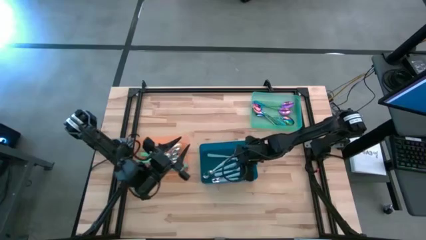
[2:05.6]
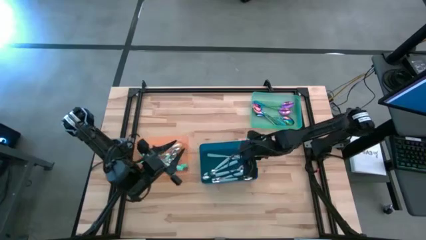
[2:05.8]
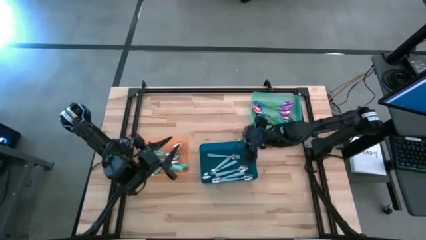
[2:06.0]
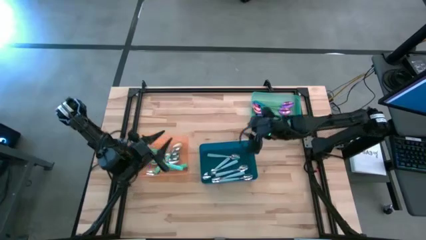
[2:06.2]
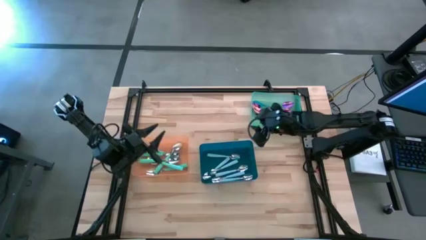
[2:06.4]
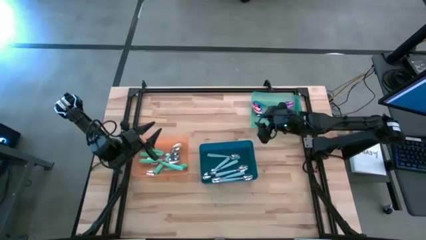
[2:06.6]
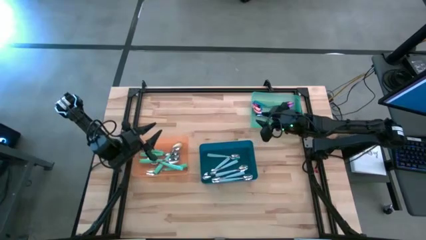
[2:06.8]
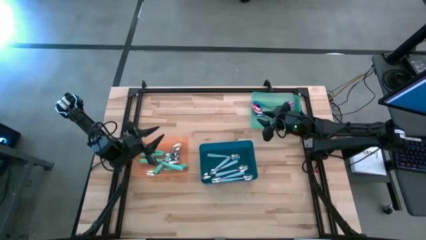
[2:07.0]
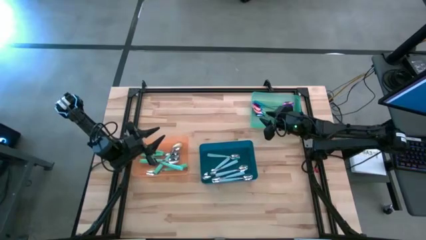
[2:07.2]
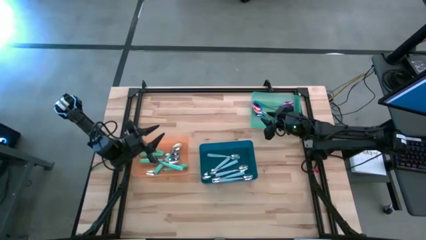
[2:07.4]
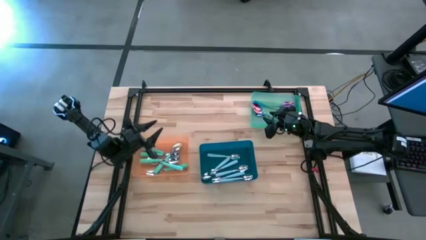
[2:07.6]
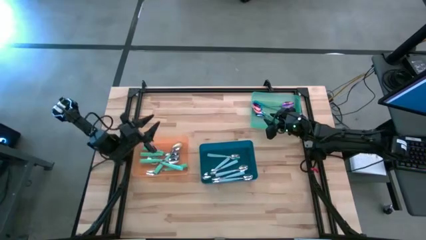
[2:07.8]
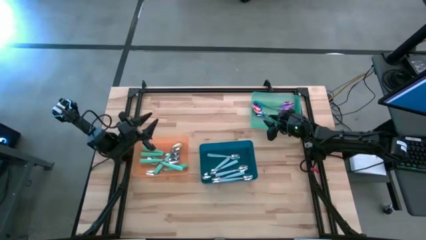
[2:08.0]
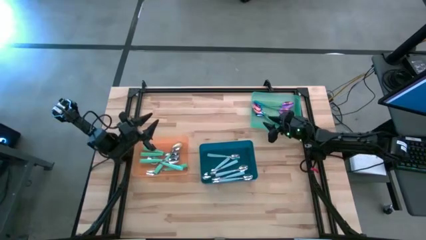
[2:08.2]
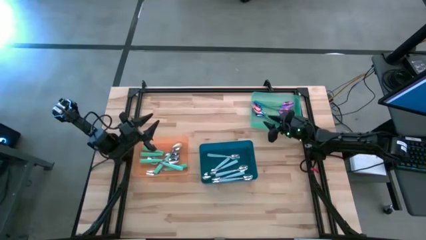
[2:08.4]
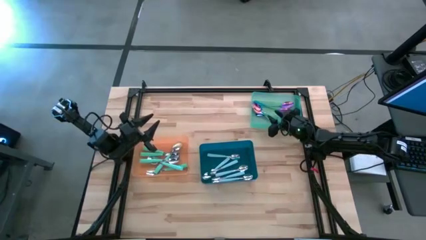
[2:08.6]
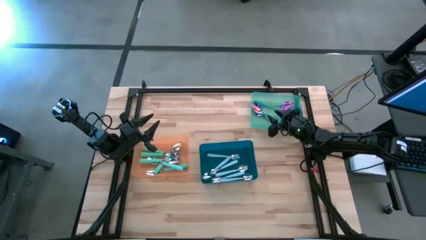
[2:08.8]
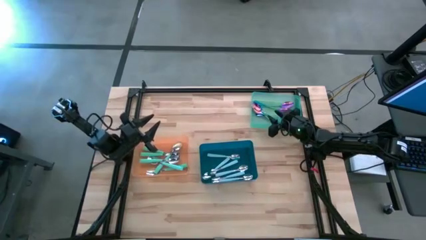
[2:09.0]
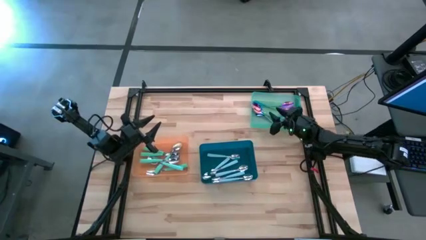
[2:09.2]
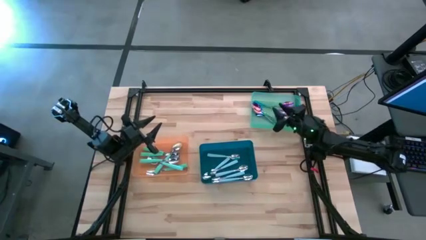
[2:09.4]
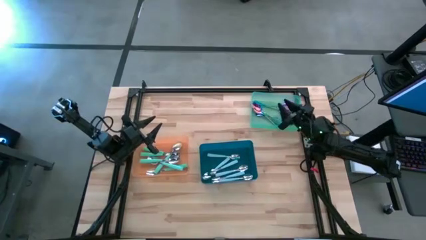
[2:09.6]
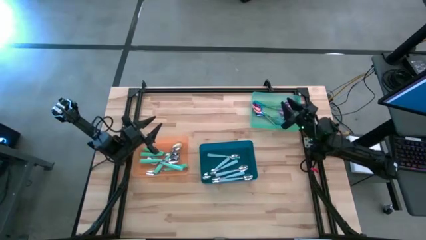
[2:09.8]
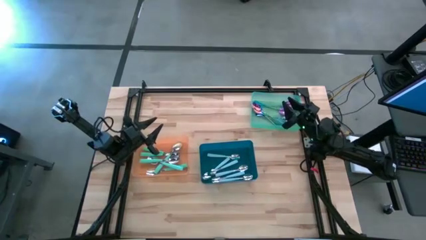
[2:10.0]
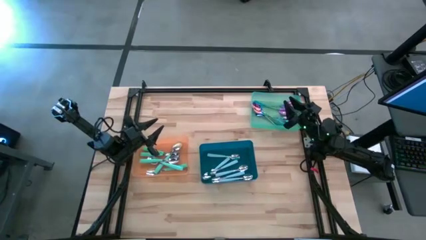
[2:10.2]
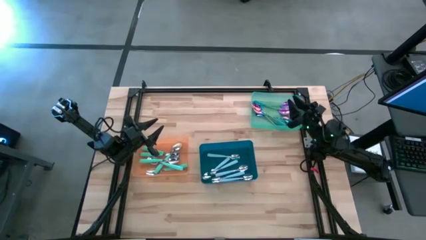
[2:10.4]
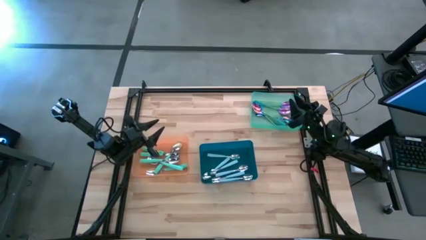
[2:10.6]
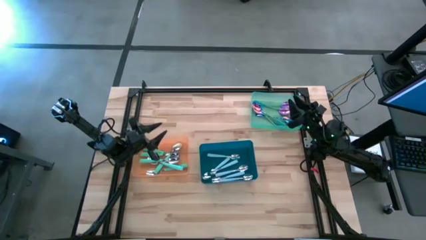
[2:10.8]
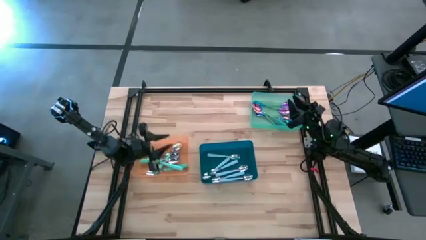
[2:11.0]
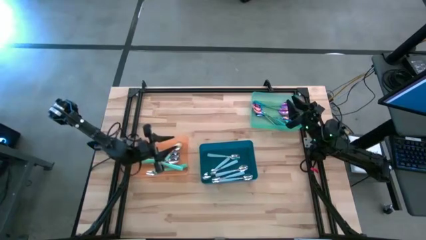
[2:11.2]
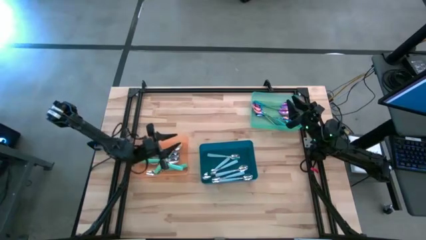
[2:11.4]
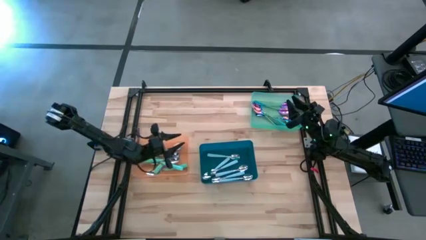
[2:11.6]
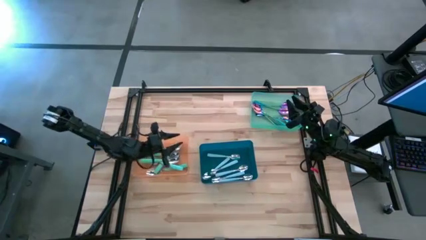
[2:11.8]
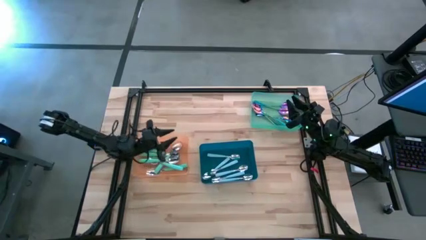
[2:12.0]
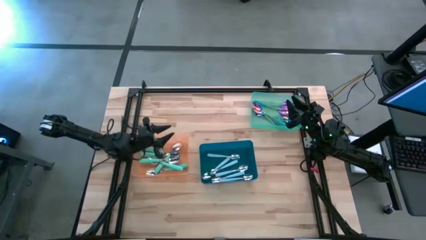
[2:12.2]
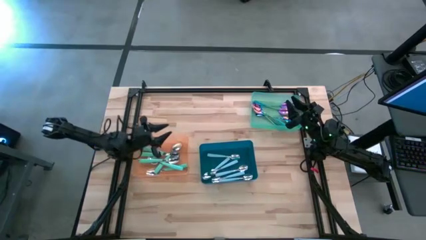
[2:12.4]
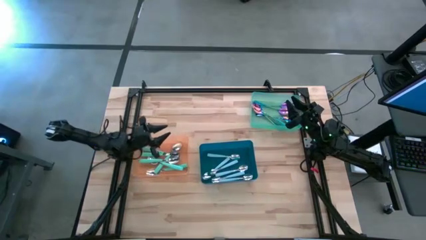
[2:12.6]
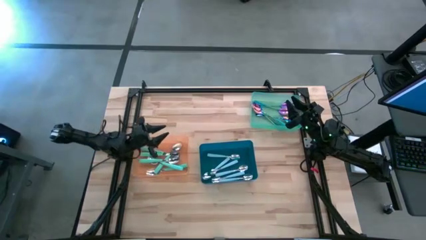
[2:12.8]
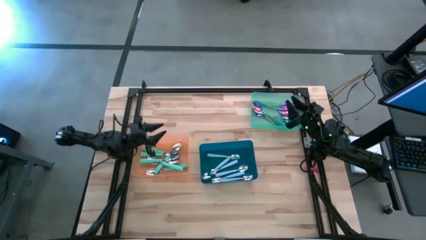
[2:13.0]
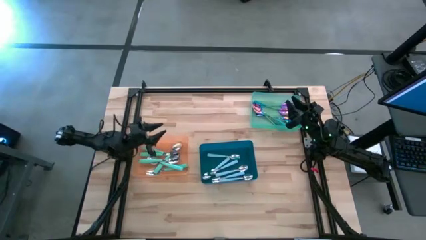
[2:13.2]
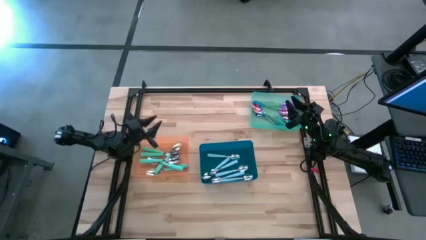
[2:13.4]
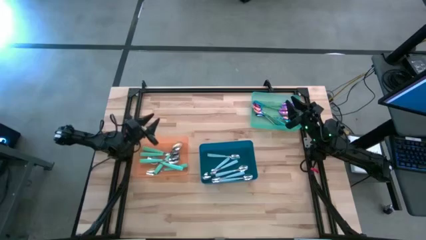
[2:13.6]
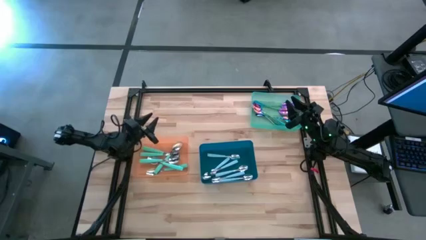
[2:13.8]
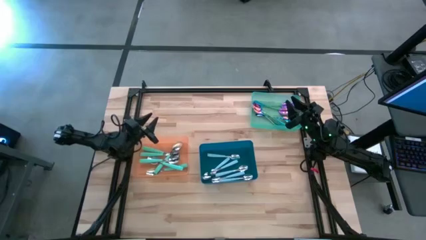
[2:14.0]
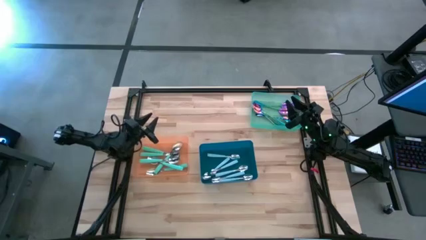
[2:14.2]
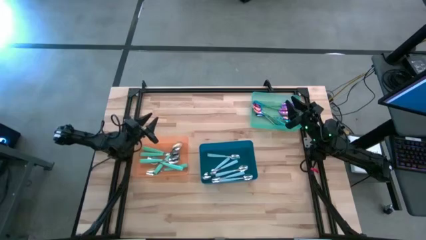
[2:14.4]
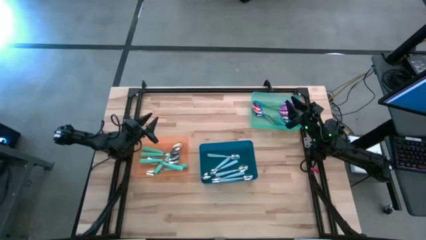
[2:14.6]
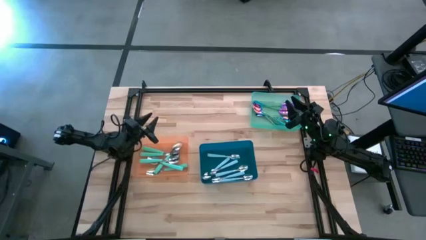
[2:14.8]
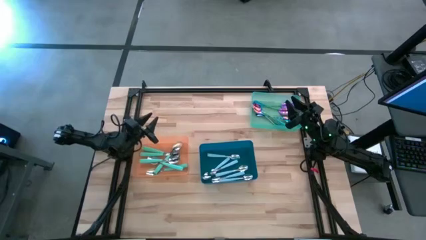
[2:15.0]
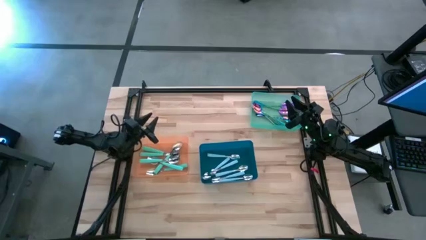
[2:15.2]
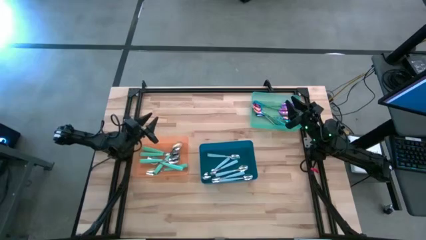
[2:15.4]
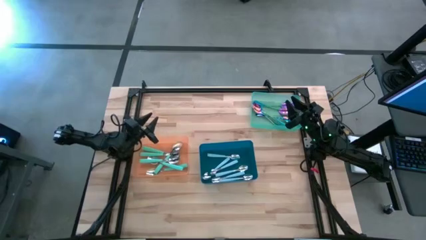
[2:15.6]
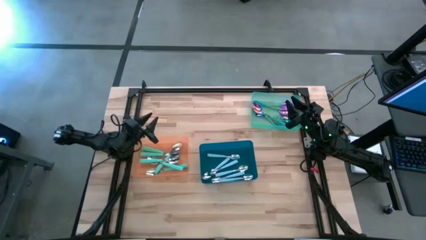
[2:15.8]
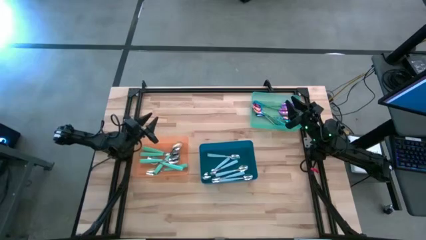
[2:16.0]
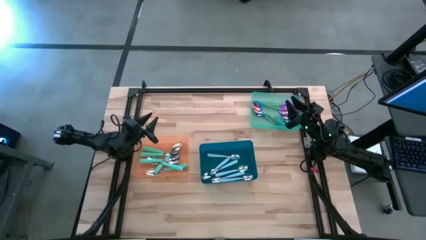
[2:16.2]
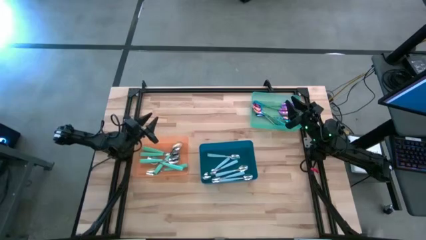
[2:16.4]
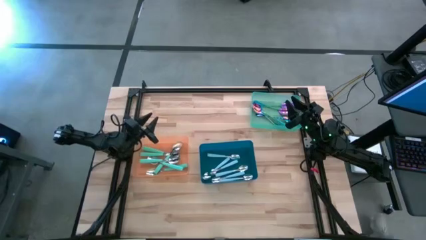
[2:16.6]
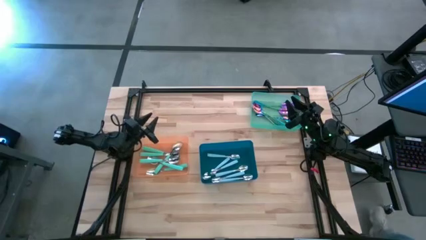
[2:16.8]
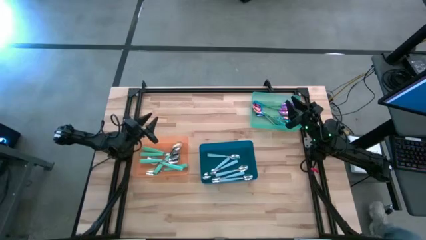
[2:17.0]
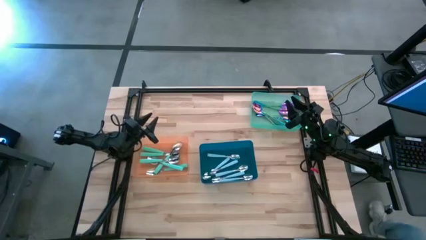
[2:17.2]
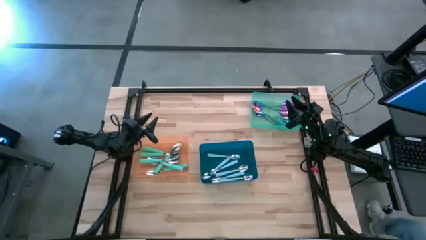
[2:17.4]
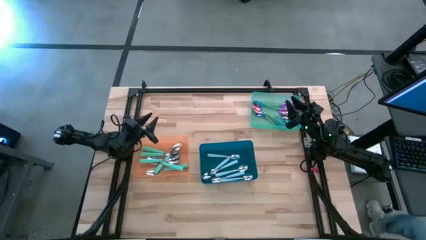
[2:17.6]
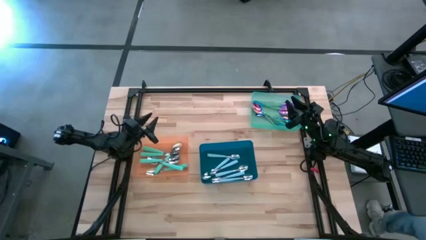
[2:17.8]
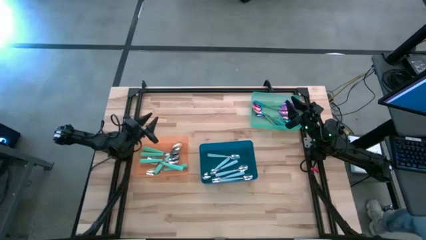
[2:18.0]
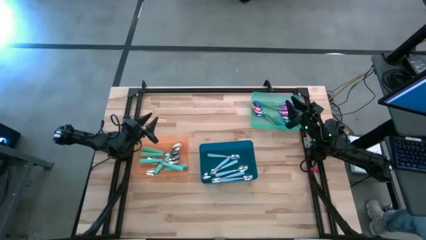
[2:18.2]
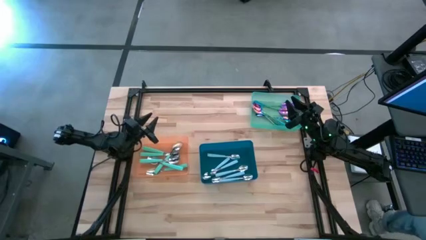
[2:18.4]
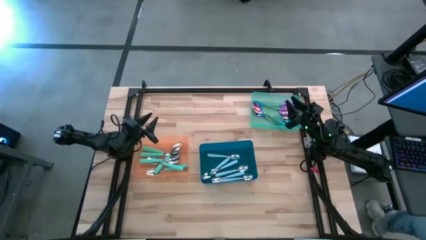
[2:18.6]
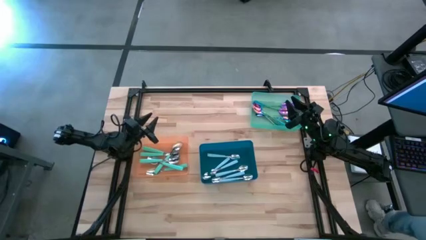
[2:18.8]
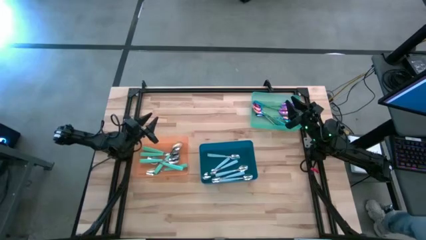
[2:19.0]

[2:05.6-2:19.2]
Task: Sort silverware by color (type)
Return to Home Position

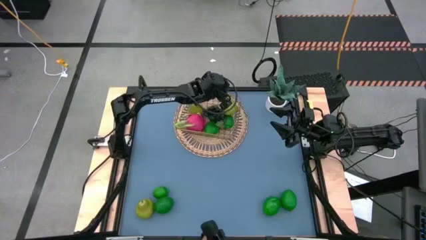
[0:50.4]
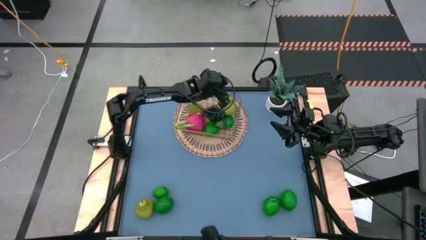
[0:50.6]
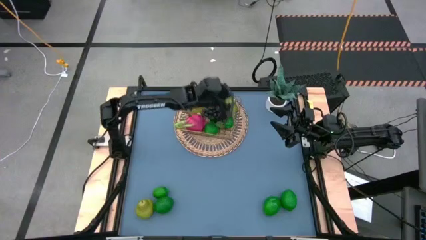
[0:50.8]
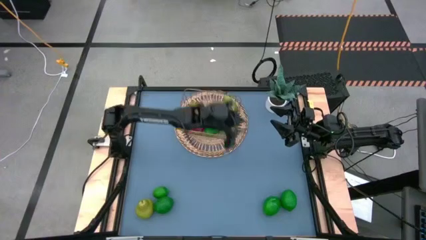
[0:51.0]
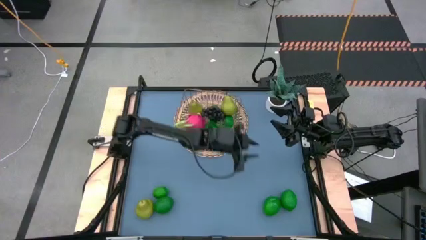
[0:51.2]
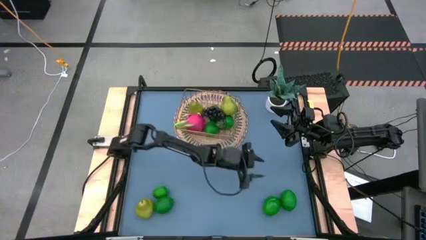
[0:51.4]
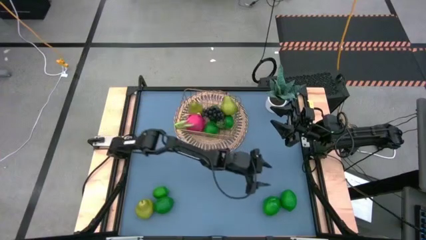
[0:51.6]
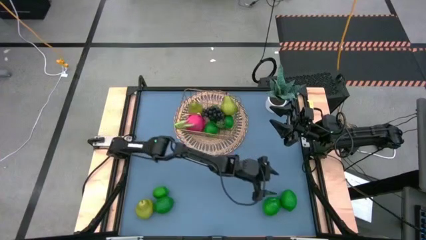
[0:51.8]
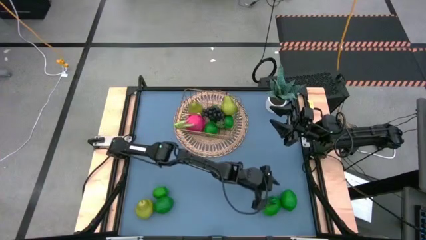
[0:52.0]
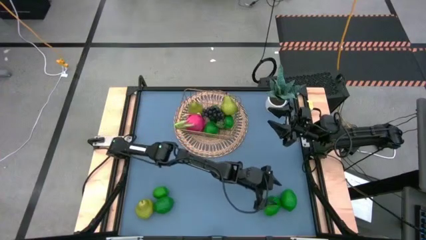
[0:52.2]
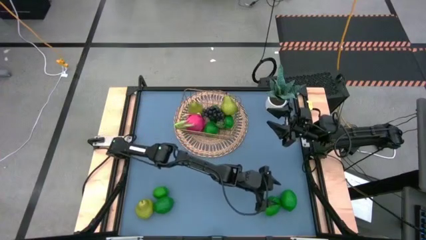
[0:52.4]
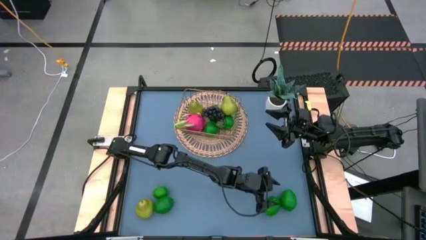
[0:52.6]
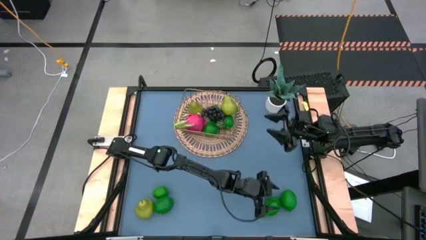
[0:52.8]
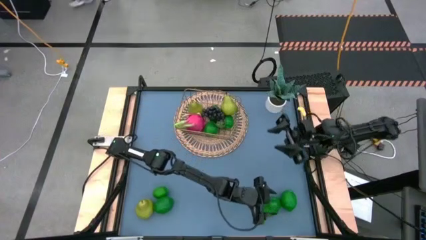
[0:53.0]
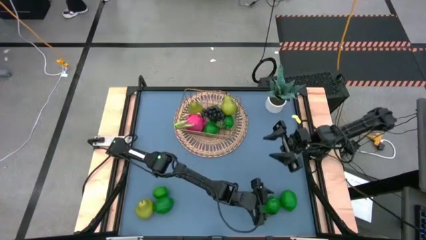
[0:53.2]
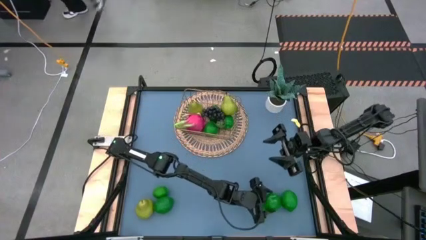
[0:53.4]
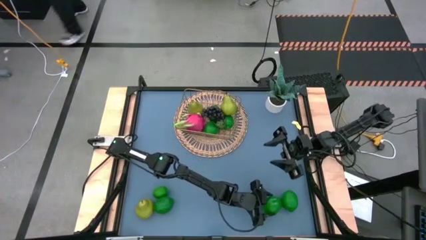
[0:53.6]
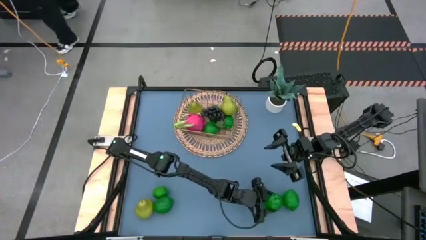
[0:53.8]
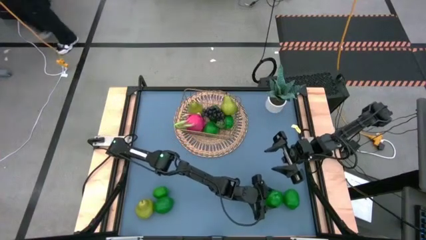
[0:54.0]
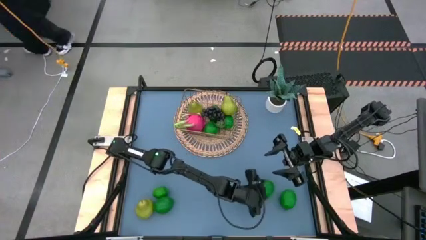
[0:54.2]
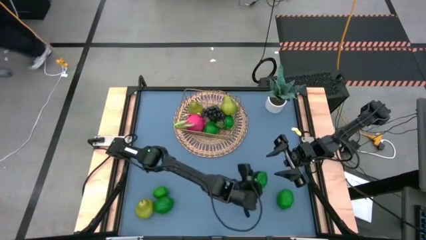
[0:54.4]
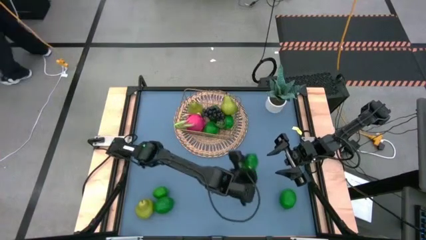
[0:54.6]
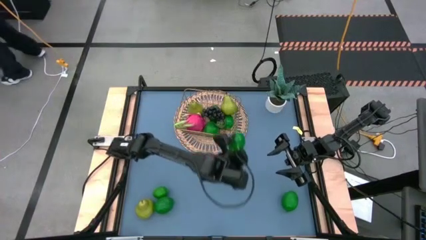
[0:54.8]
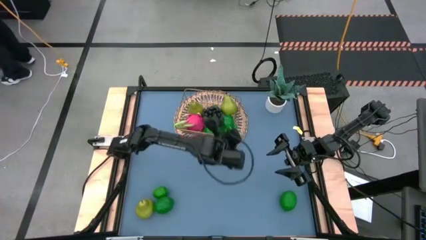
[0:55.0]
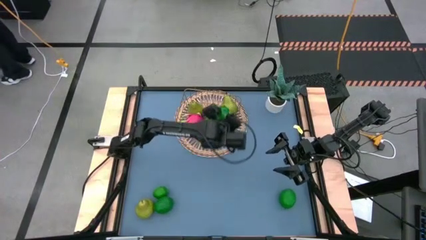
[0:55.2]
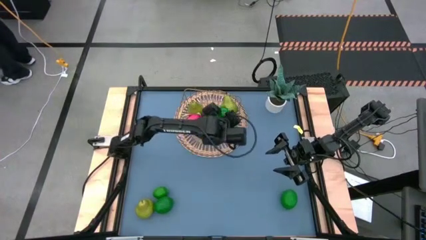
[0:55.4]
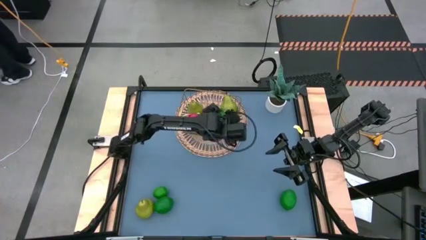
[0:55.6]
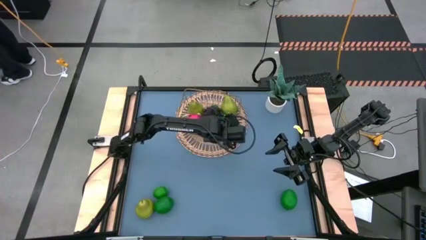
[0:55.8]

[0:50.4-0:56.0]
Task: Build produce basket
Put the green lime into the gold wire basket
